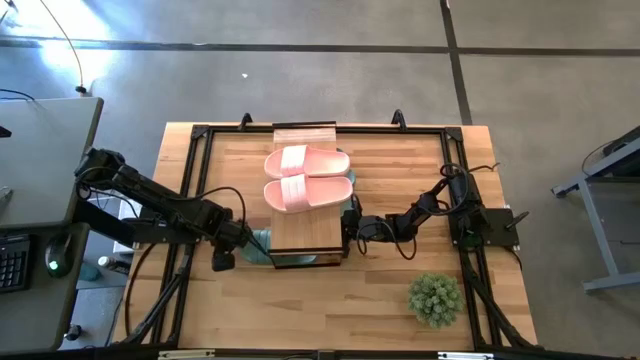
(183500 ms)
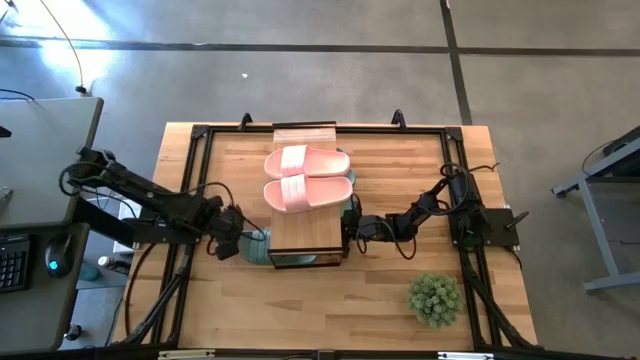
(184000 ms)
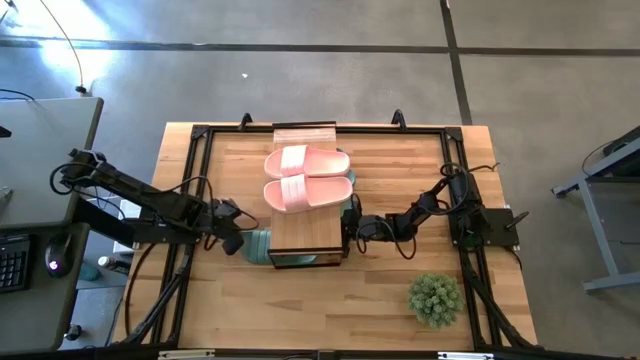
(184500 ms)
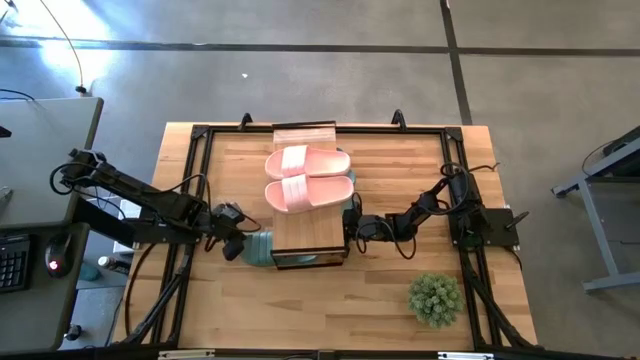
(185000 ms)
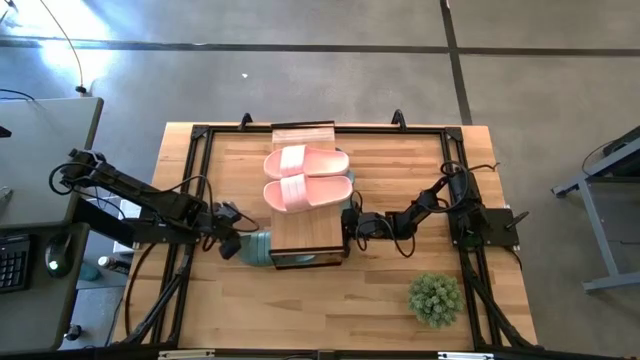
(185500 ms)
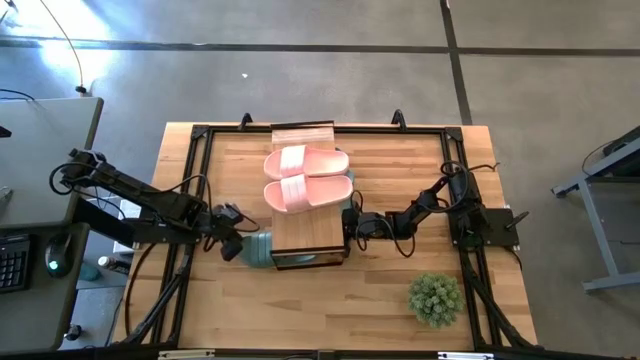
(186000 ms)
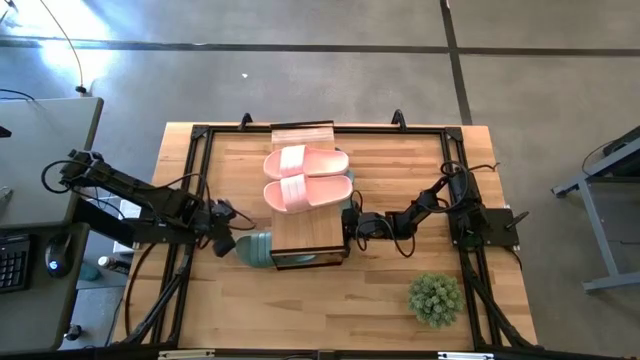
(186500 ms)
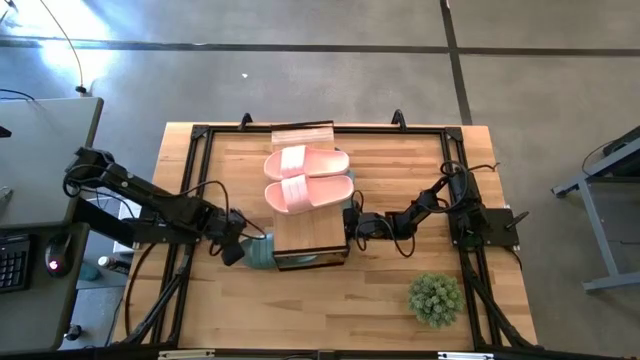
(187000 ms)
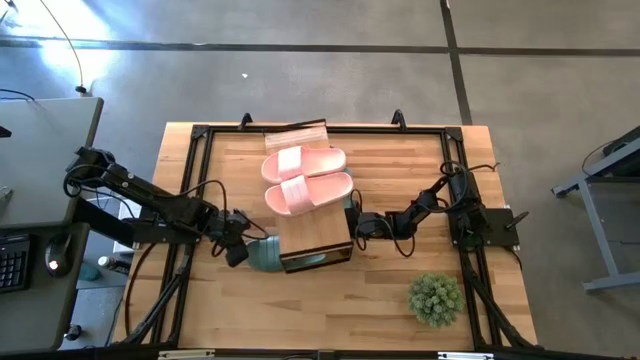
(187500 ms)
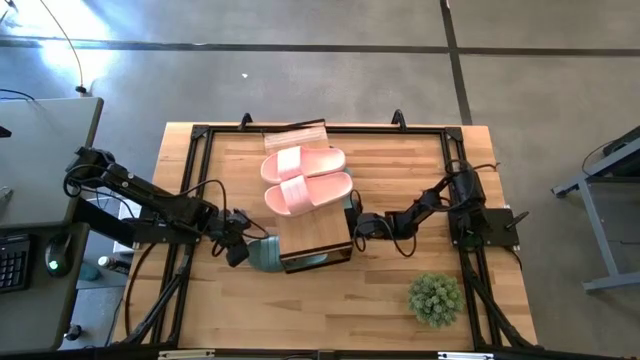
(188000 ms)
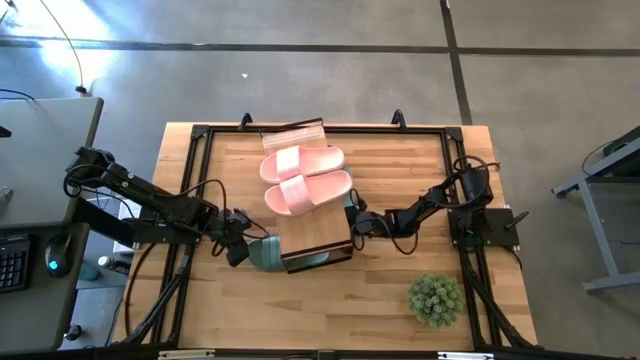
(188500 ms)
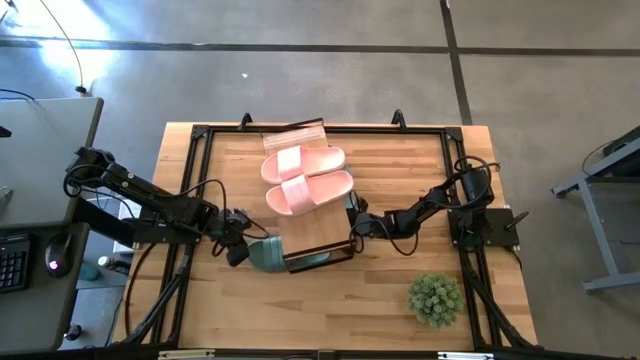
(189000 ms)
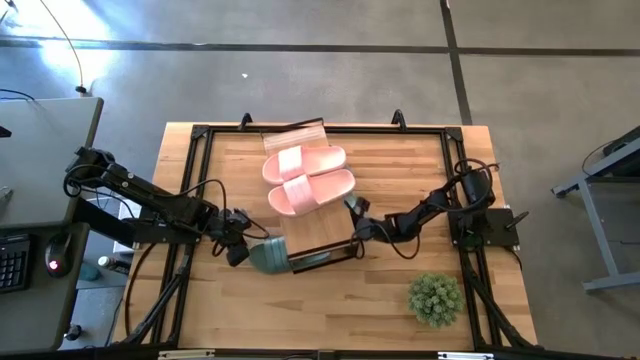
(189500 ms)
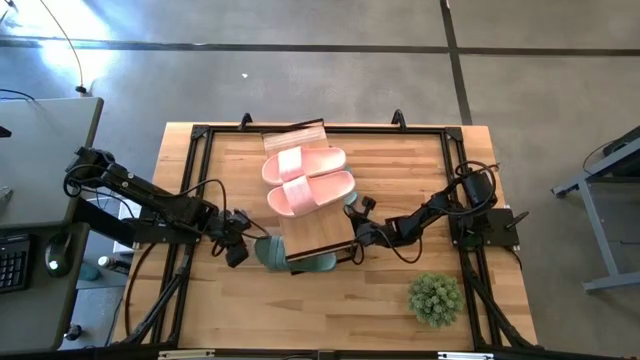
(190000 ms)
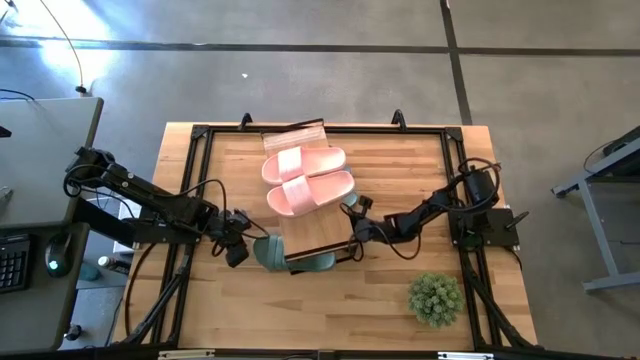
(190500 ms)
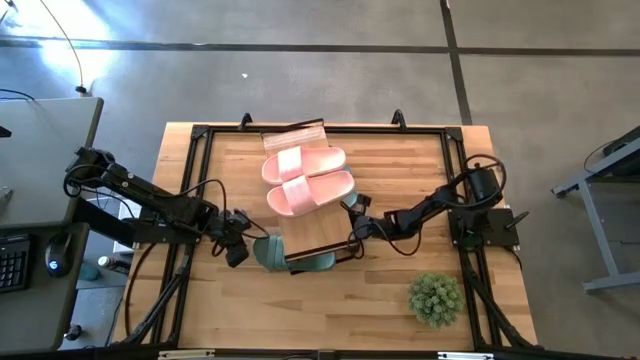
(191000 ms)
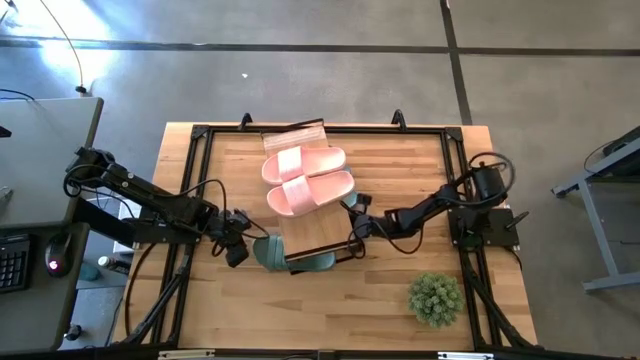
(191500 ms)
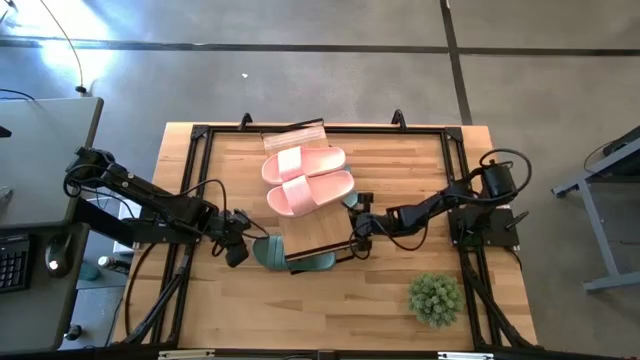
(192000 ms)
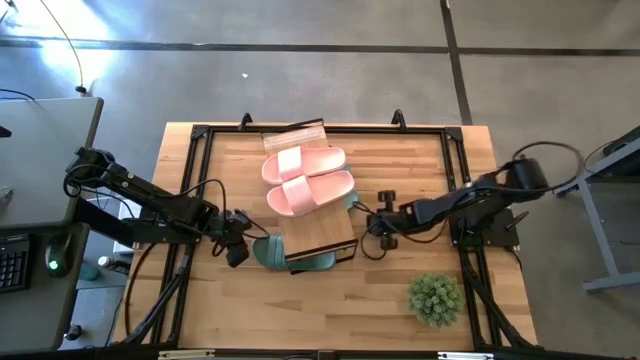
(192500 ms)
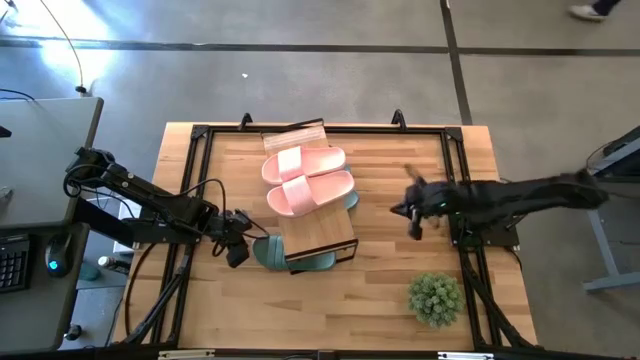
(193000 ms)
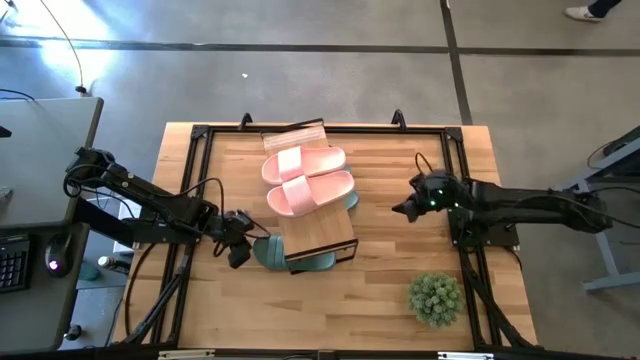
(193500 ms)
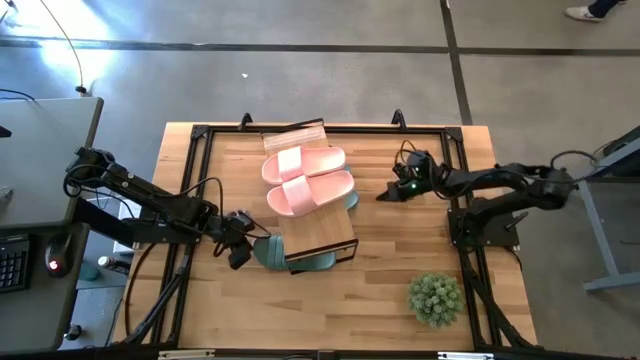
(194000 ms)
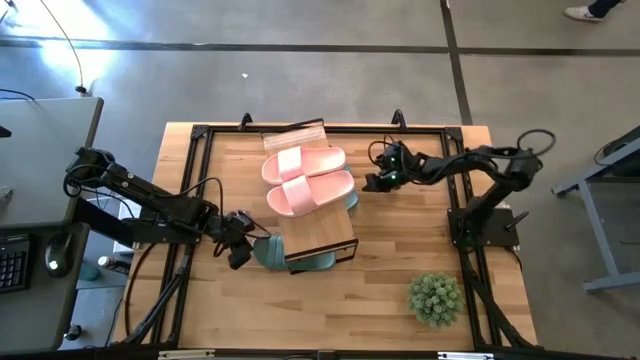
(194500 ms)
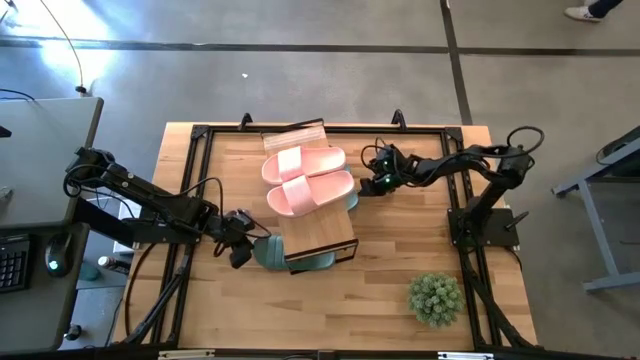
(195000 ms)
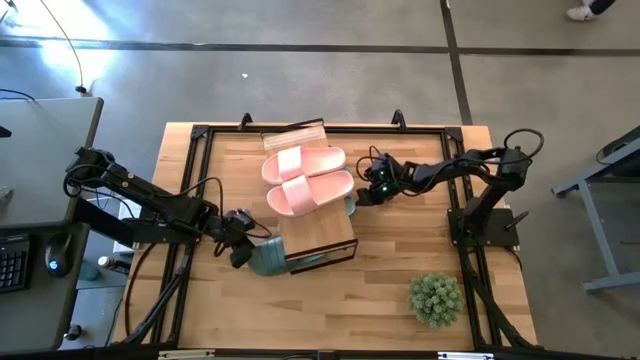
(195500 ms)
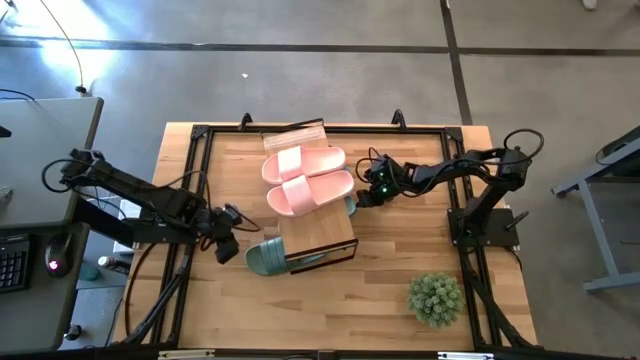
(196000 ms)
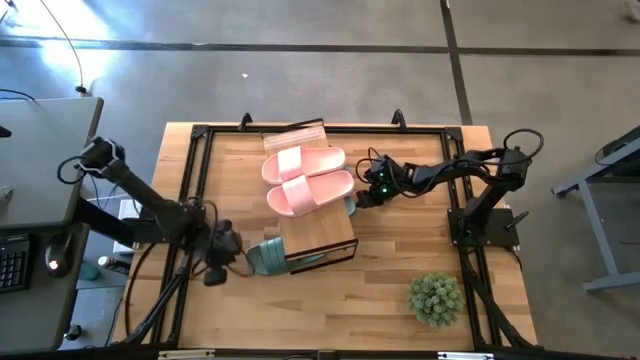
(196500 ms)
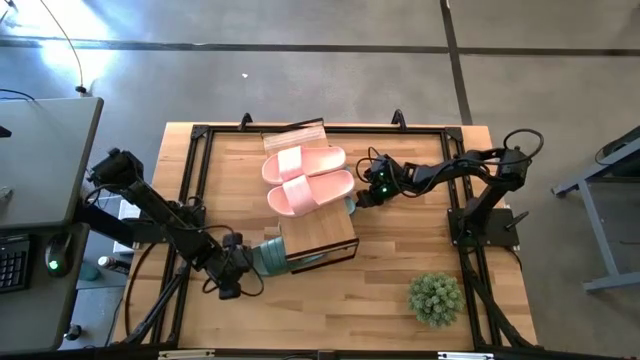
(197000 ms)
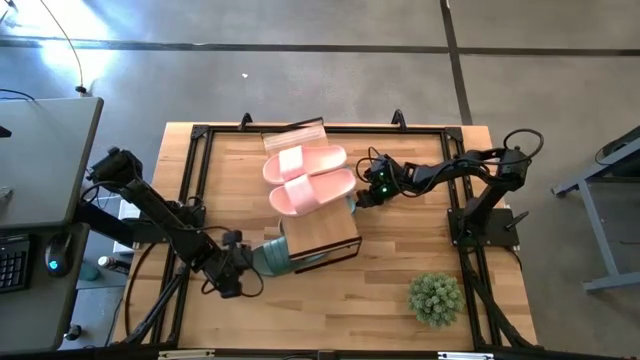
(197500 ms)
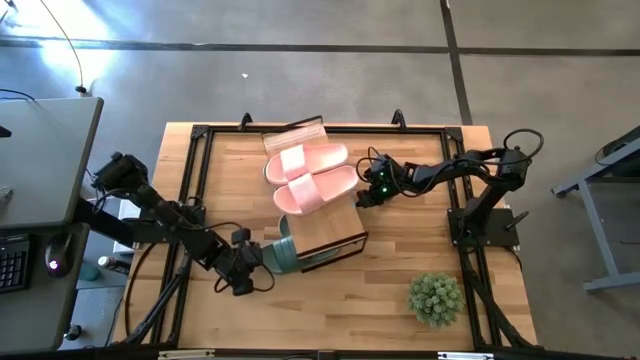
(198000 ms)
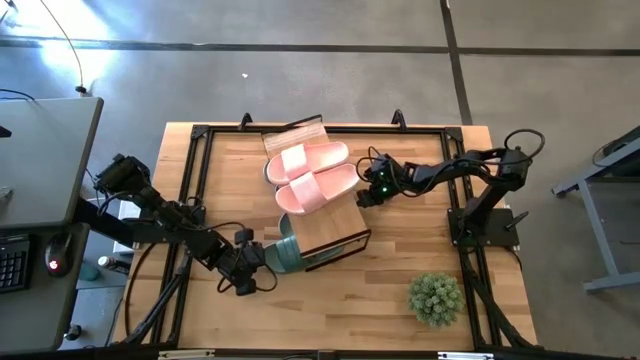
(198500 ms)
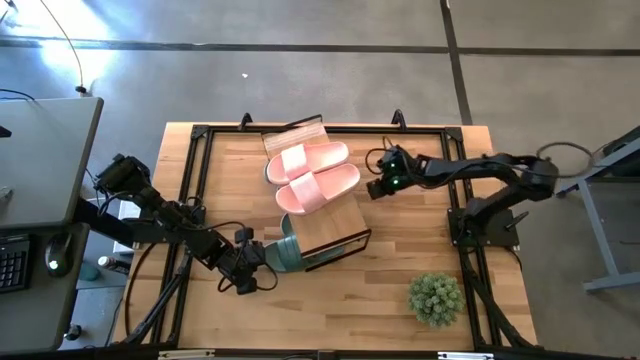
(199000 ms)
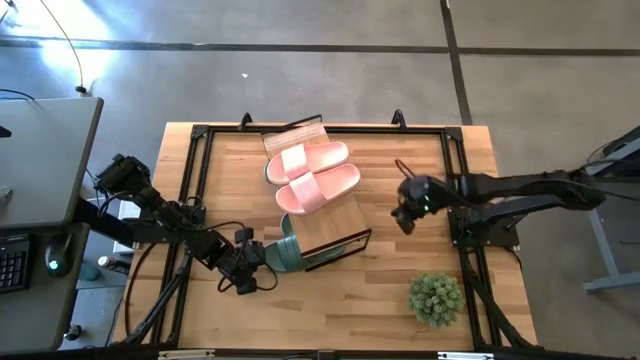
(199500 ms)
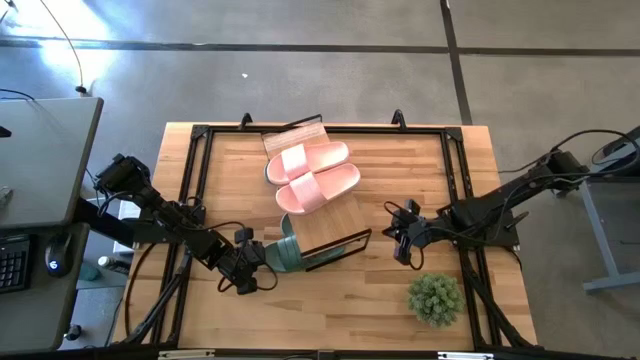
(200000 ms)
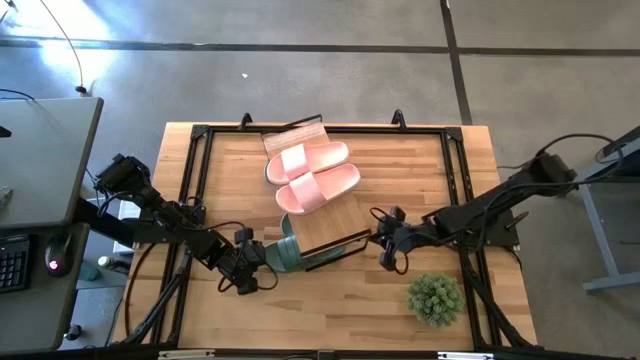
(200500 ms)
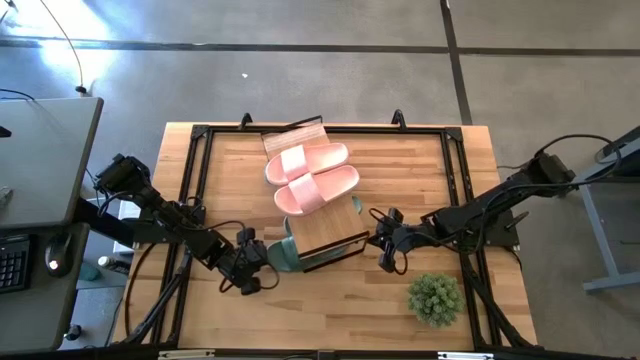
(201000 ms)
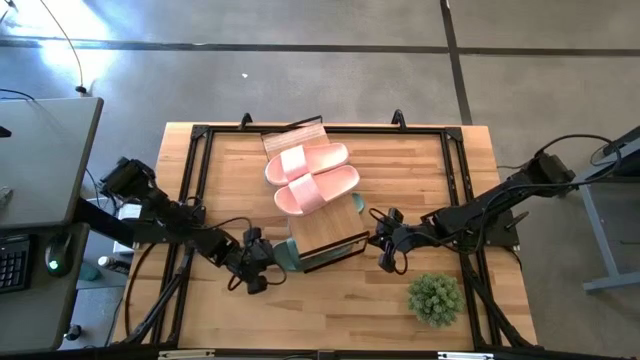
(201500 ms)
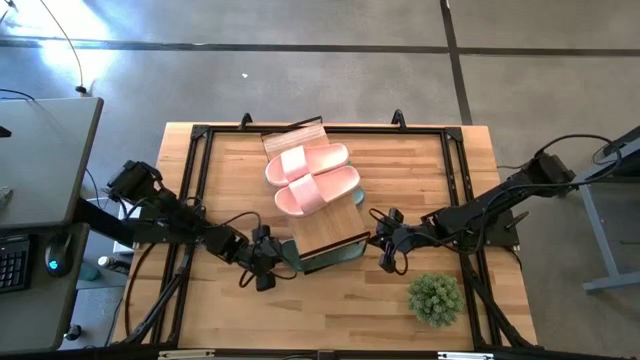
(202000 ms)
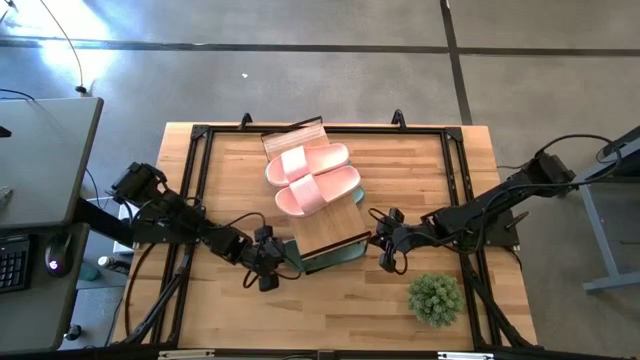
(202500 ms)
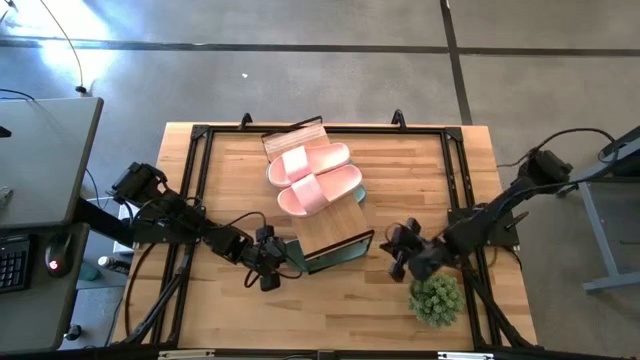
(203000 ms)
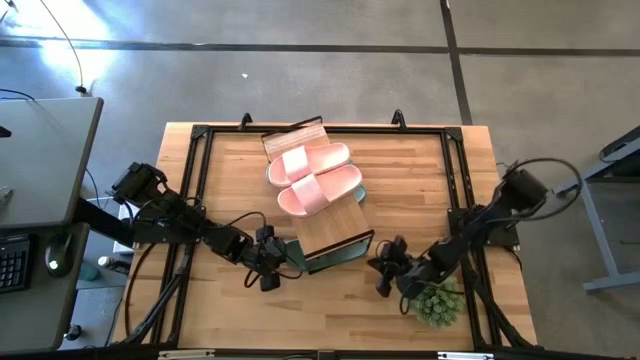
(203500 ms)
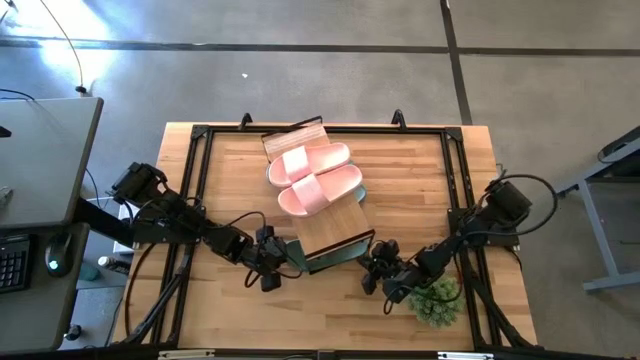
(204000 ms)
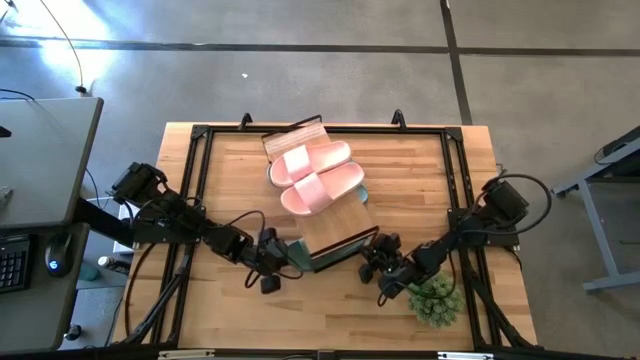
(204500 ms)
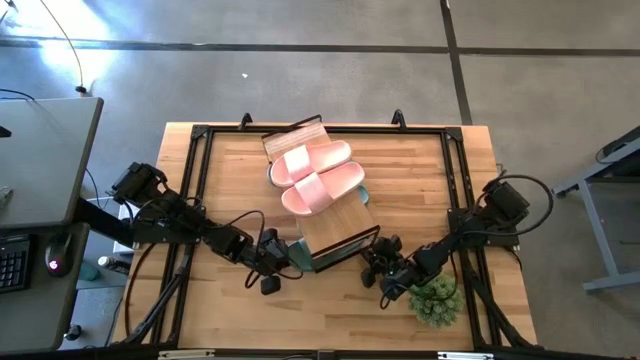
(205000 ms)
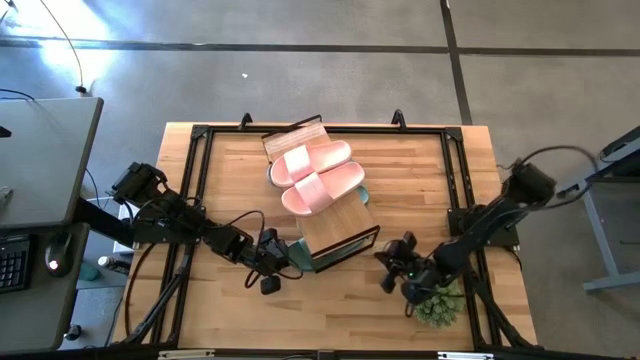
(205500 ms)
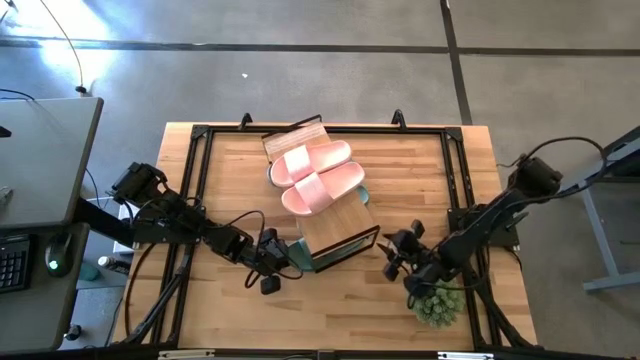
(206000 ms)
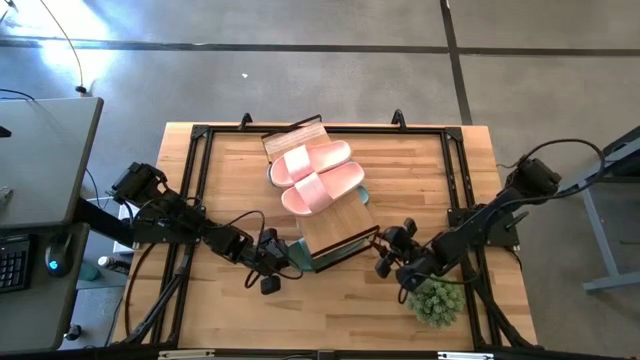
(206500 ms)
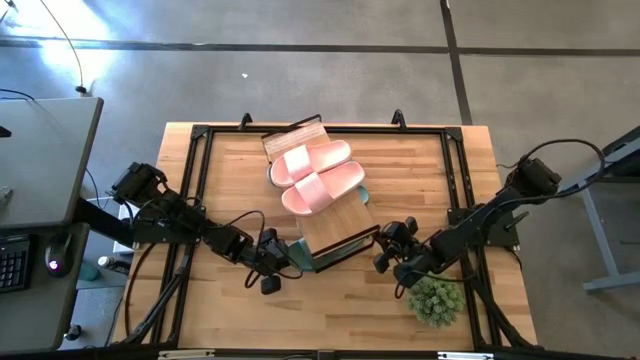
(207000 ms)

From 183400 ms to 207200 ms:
Task: Pick and place slides into the shelf
Put the green slide under the shelf
